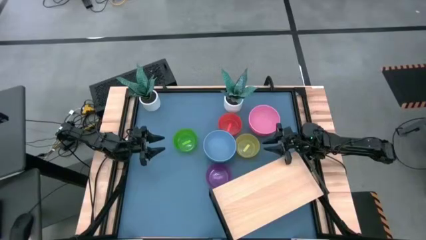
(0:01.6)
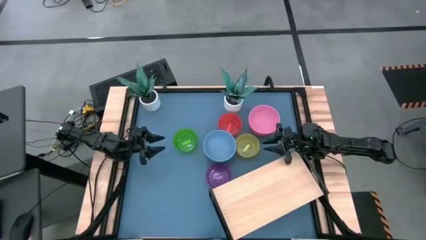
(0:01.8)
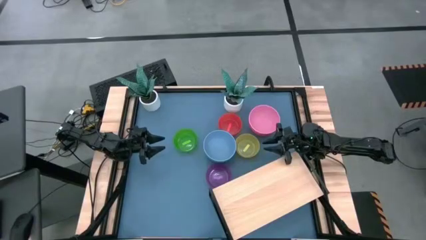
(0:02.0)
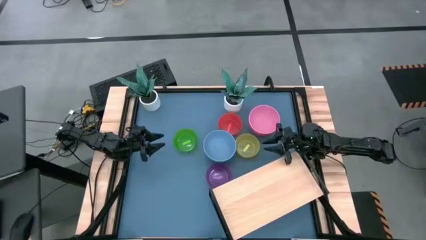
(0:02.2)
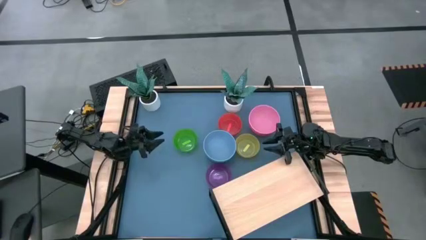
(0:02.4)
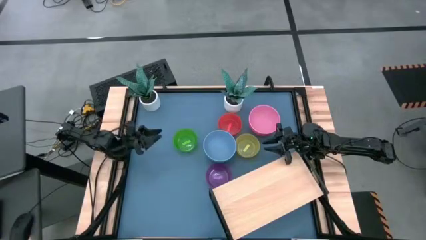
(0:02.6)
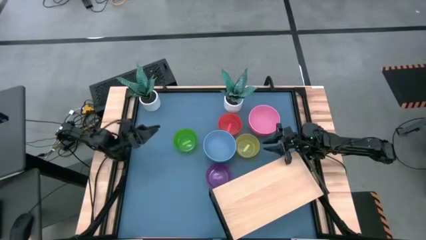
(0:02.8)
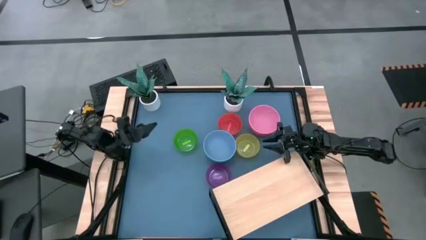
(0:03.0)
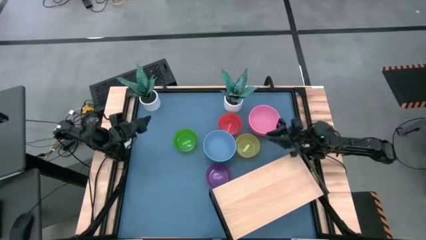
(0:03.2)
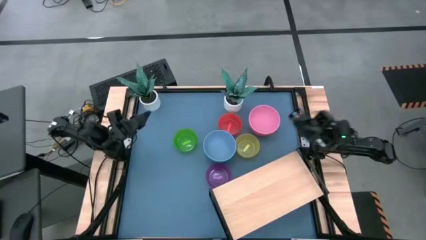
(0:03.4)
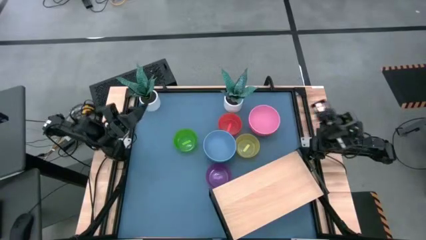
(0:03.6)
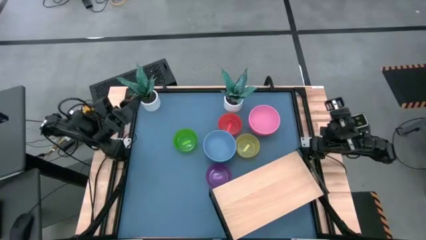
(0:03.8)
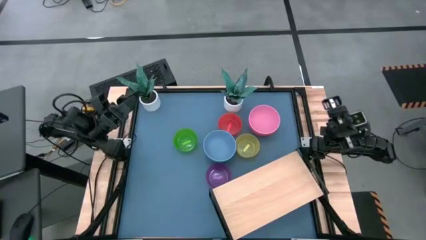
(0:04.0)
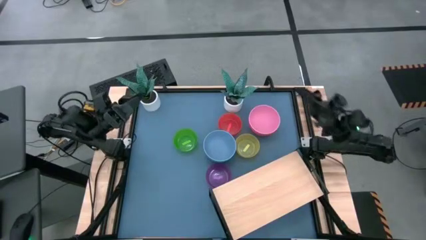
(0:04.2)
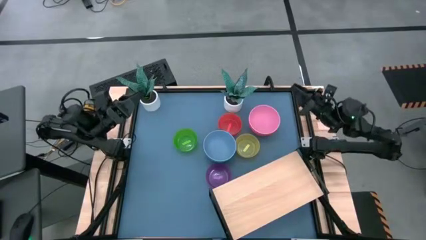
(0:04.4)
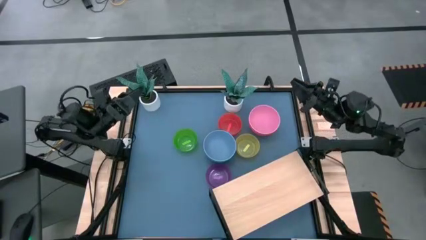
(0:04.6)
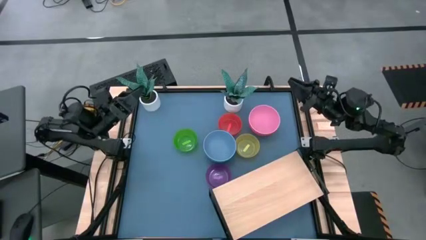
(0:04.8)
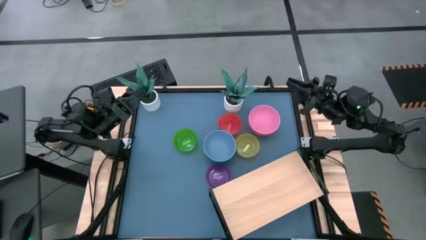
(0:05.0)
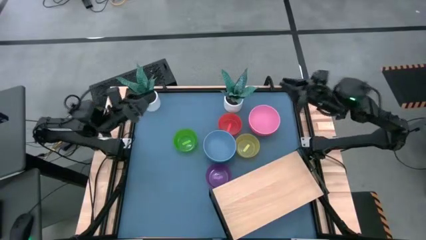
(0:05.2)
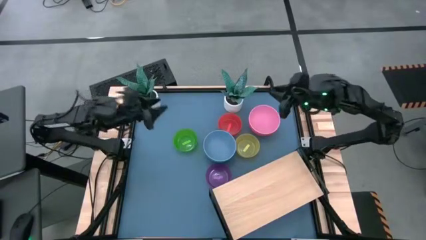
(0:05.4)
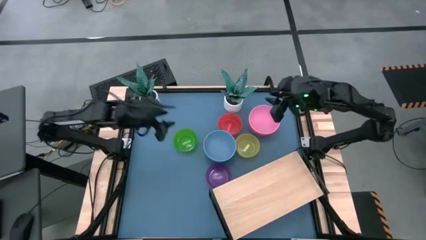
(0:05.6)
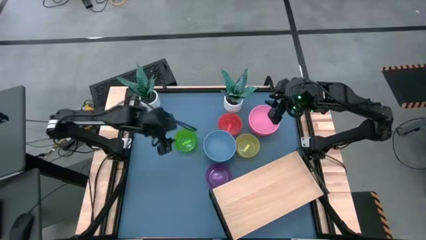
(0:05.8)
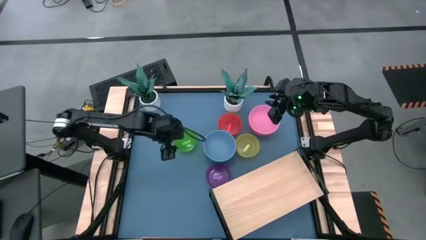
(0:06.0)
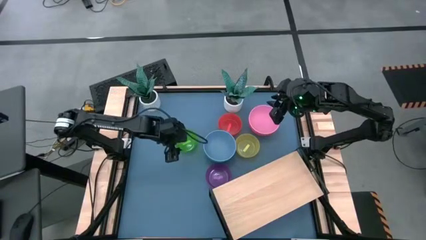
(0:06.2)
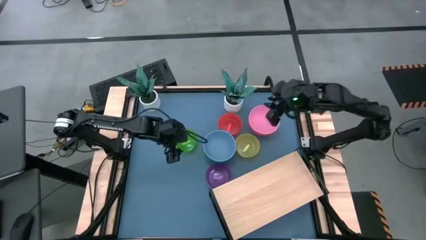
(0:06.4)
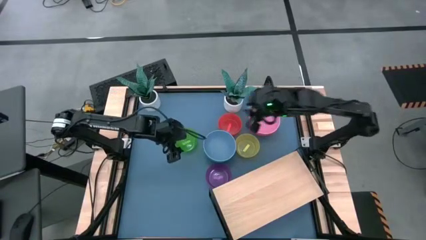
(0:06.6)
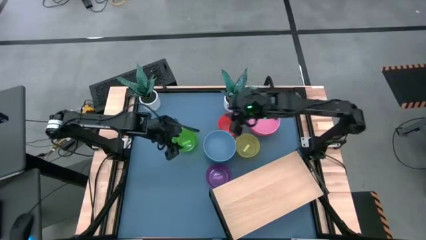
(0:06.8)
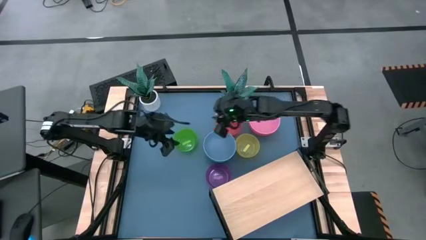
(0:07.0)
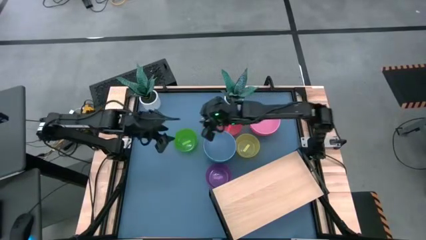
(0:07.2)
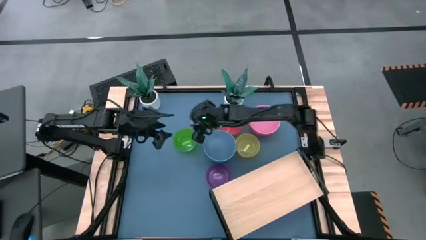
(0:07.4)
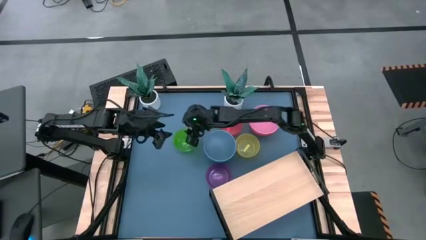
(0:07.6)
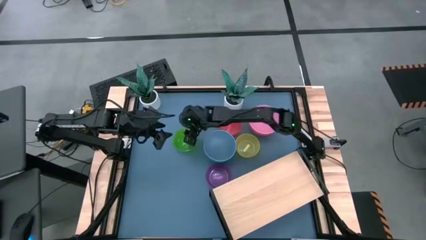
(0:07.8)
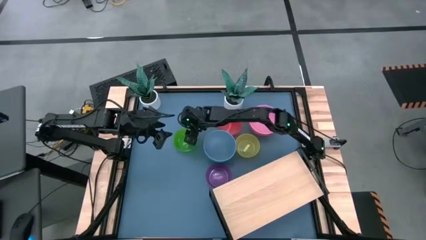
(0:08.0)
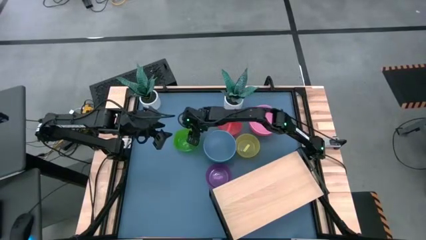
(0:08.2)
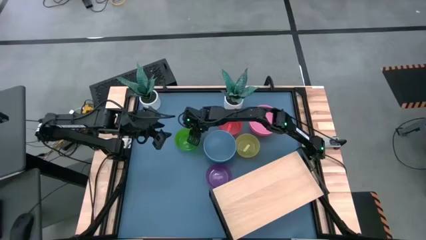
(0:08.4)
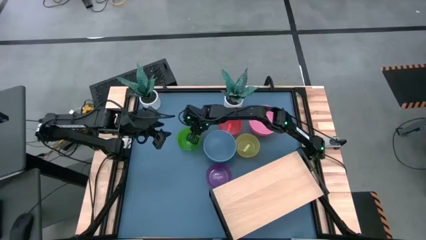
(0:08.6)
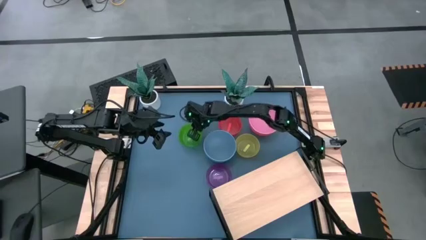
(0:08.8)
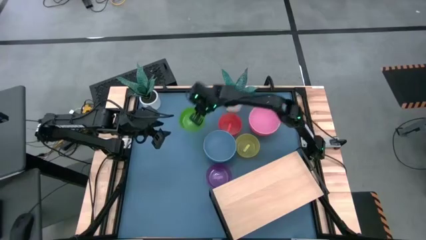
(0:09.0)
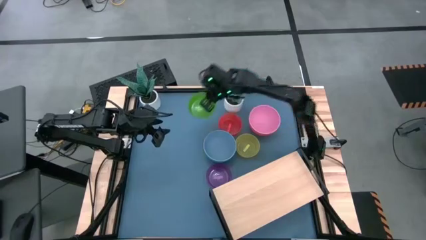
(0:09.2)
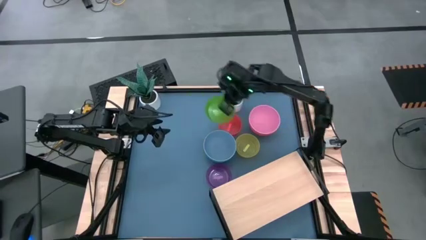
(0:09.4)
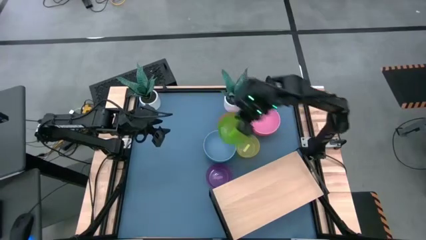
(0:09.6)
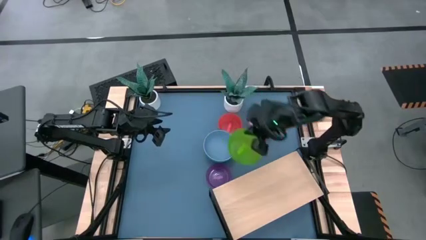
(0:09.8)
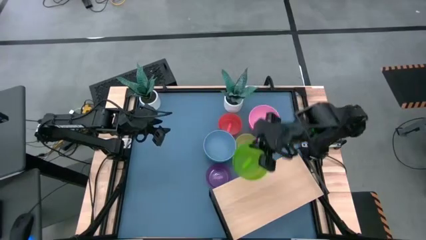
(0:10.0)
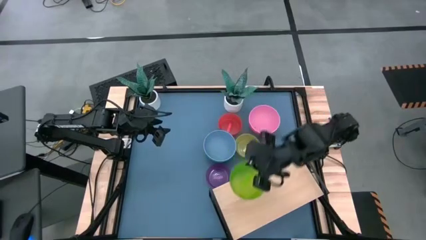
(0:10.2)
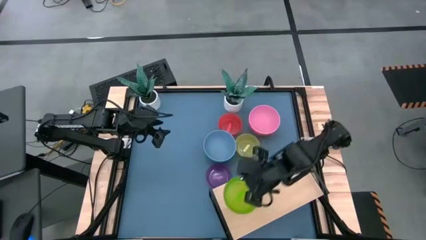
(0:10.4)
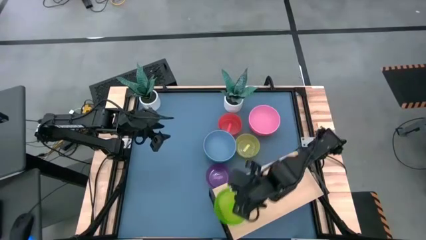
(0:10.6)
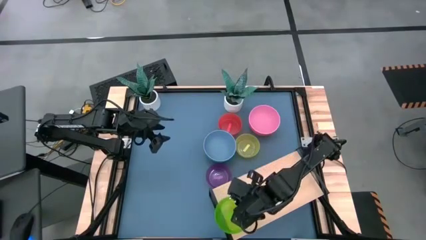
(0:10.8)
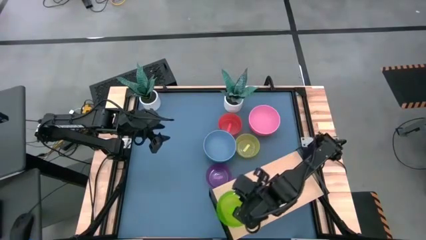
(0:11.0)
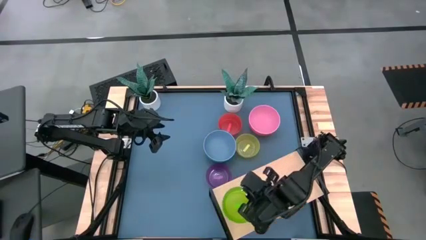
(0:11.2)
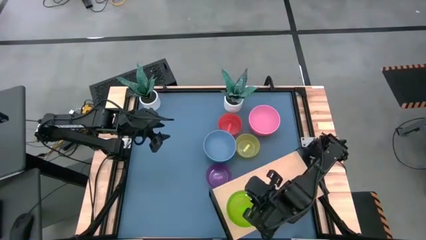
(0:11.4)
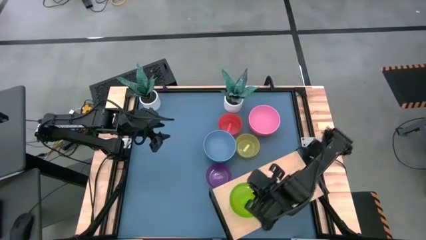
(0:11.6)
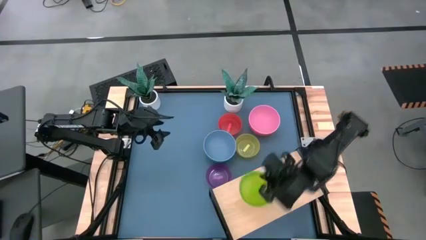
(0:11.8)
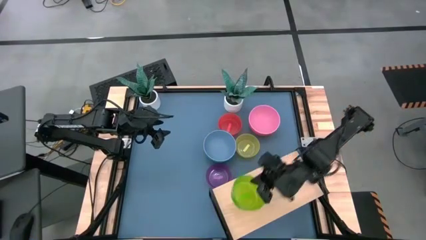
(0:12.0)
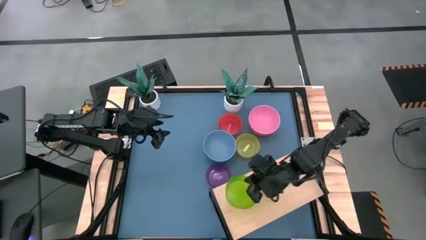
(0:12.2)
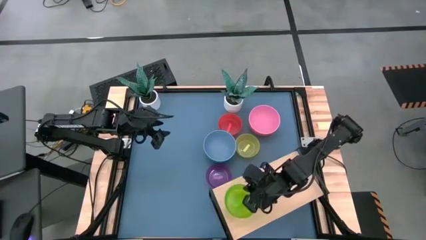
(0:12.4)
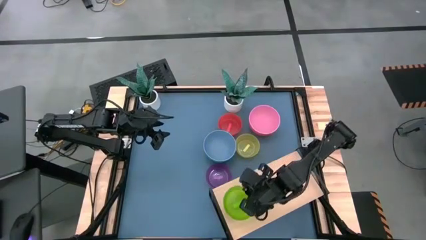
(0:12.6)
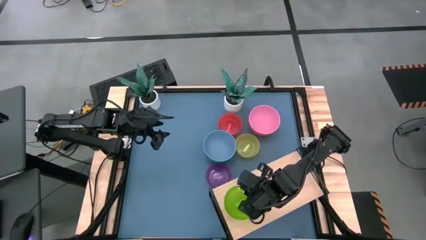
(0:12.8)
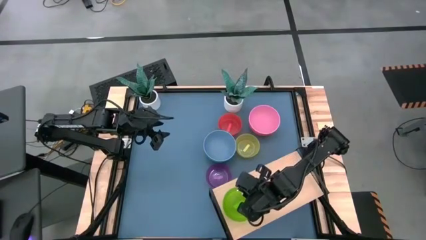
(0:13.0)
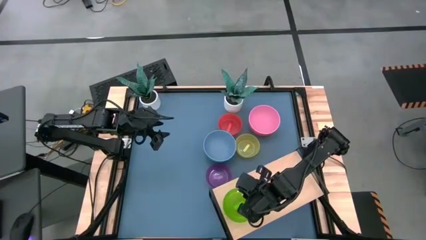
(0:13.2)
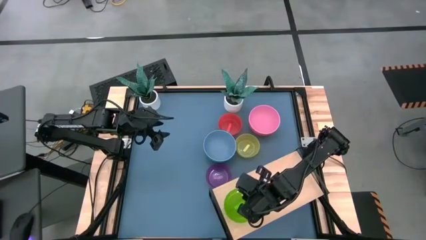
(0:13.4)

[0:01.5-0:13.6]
Task: Place and stack bowls onto a shelf
Put the green bowl on the shelf

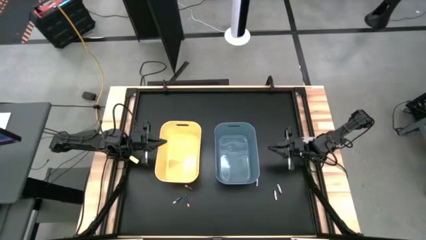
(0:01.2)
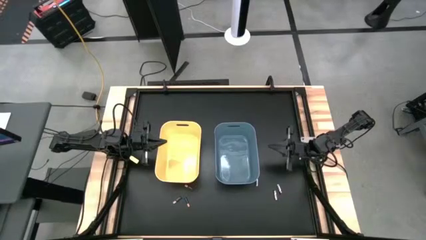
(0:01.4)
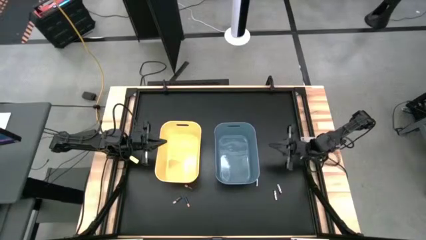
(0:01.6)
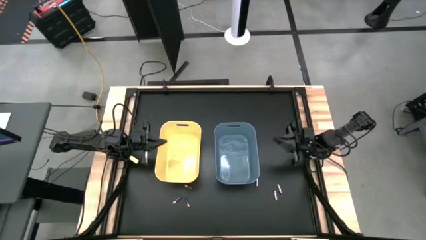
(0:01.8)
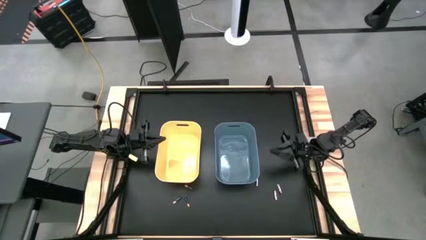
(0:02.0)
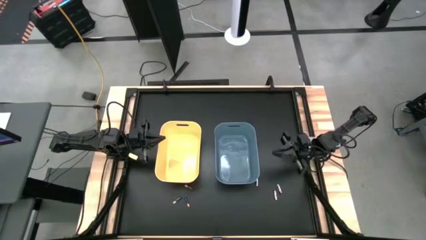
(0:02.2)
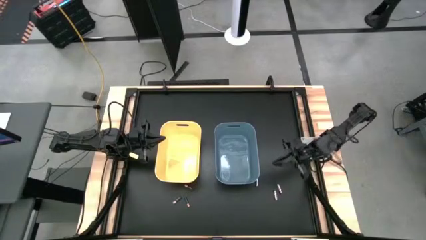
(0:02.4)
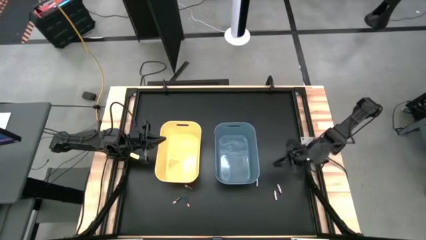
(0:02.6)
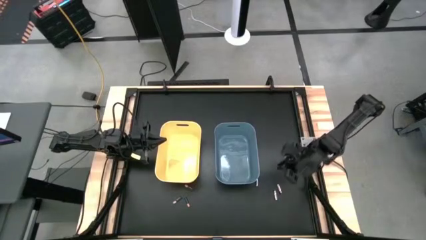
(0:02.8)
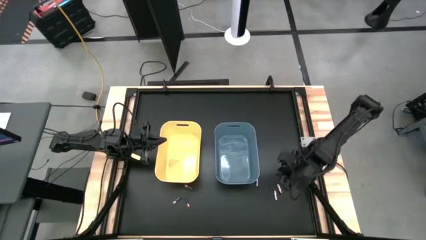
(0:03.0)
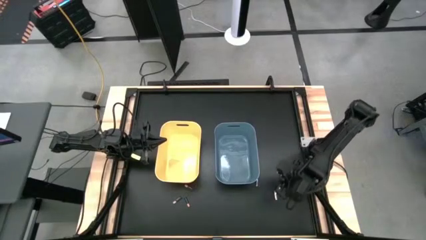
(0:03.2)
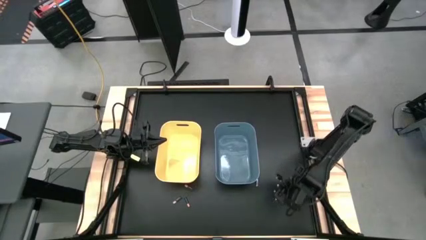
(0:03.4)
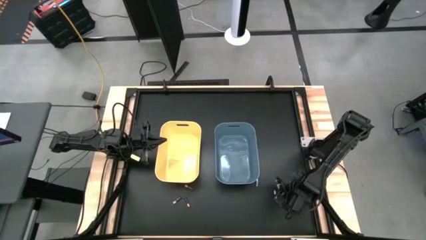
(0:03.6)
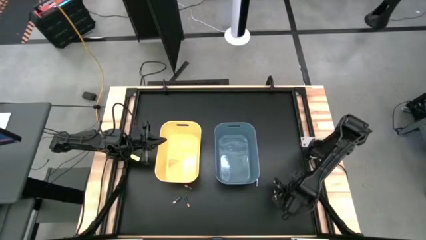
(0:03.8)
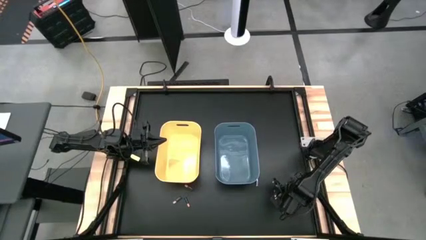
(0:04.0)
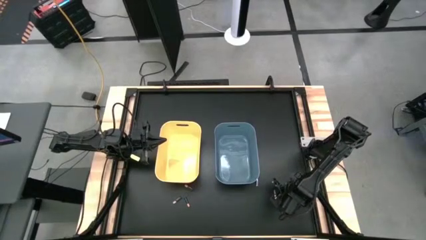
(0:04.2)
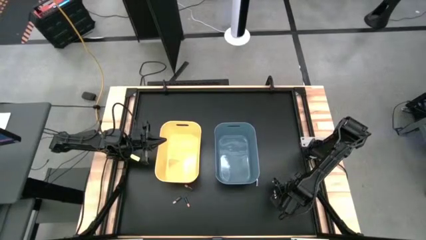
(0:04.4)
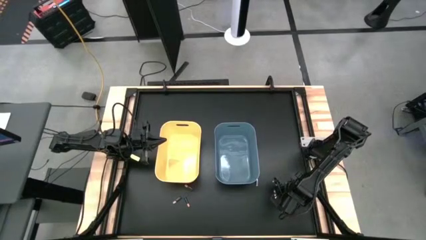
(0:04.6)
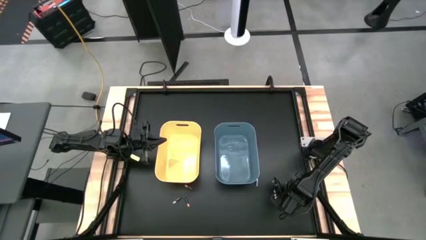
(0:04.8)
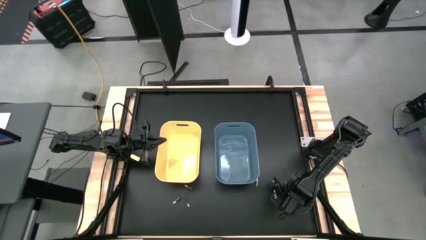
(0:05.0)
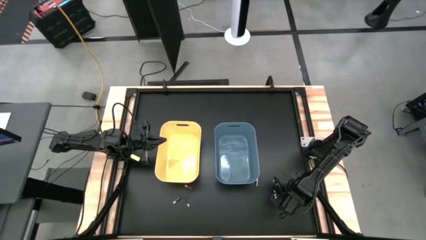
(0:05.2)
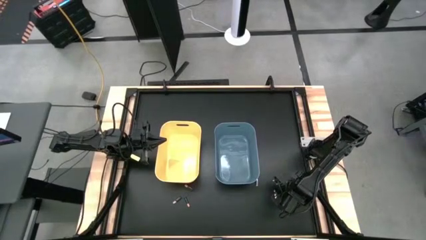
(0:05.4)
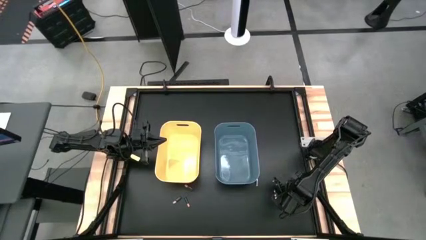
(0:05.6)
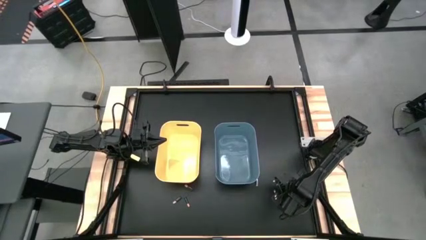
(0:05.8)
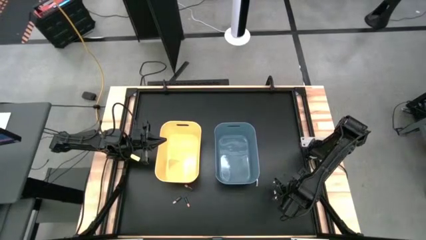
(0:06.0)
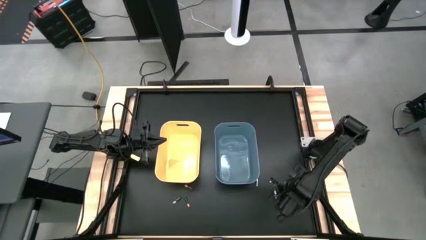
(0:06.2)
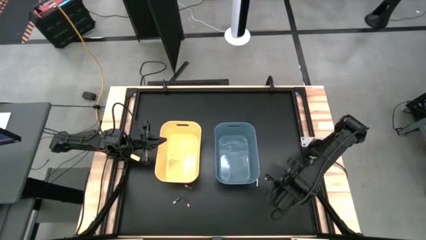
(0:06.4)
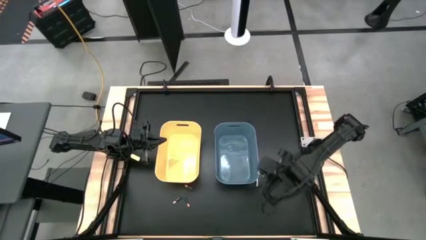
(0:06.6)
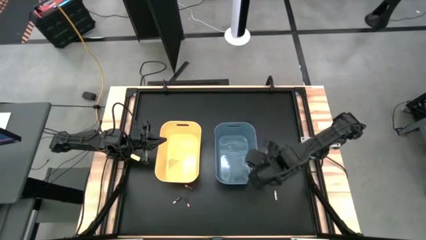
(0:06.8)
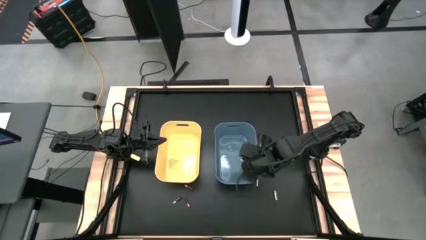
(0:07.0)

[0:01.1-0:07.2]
Task: Sort batteries
Put the right silver battery into the blue bin
